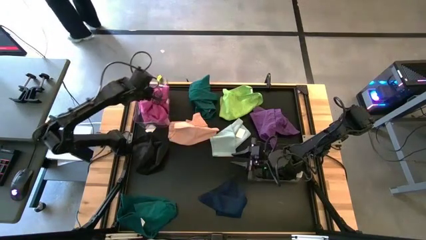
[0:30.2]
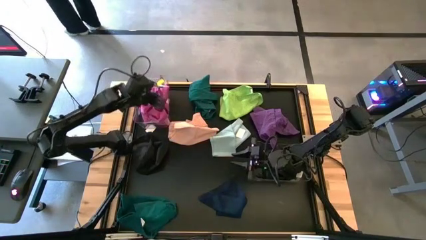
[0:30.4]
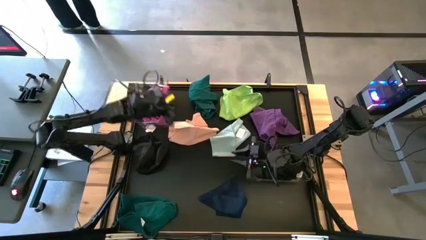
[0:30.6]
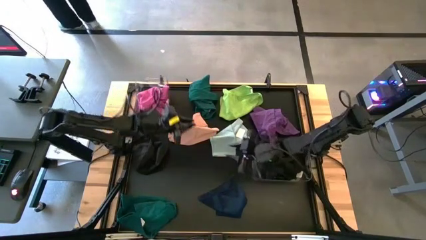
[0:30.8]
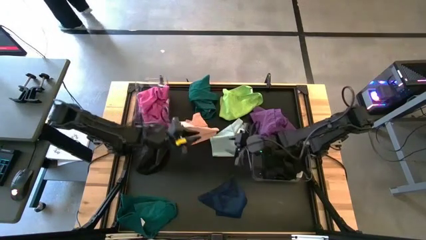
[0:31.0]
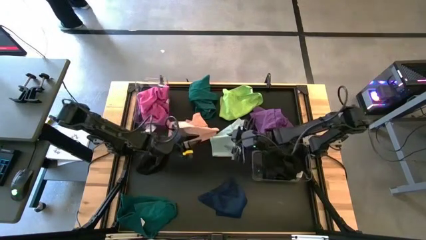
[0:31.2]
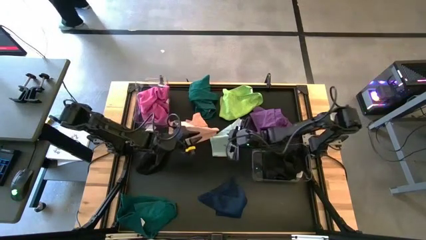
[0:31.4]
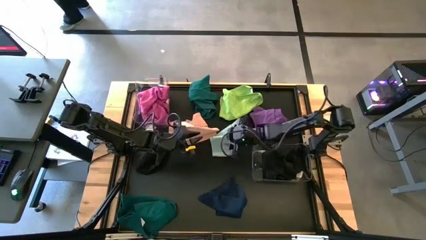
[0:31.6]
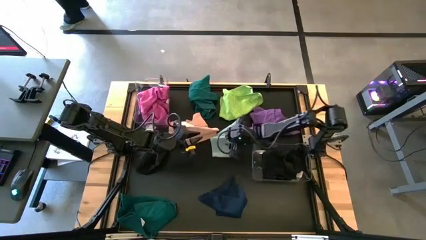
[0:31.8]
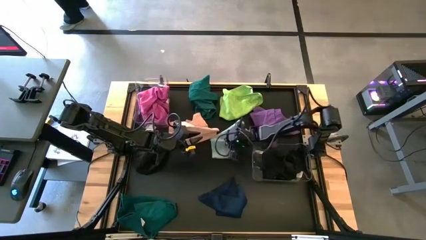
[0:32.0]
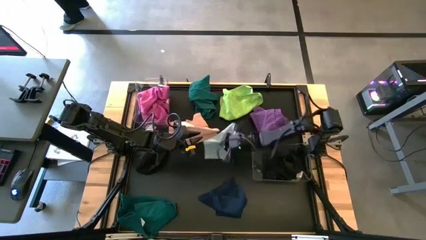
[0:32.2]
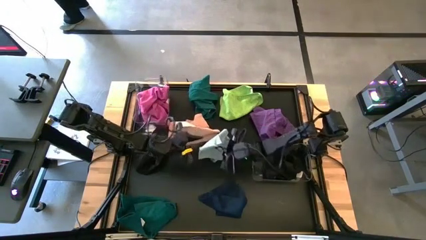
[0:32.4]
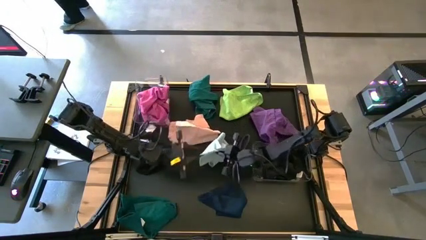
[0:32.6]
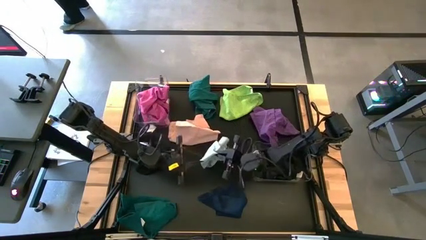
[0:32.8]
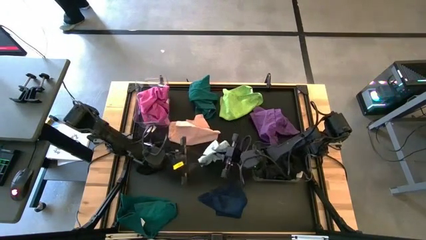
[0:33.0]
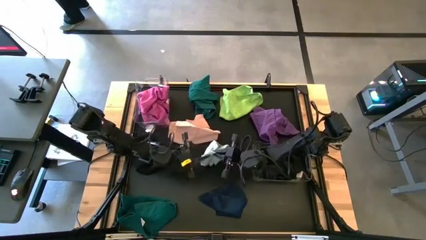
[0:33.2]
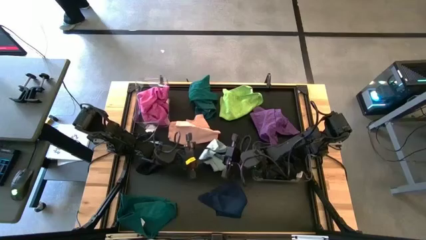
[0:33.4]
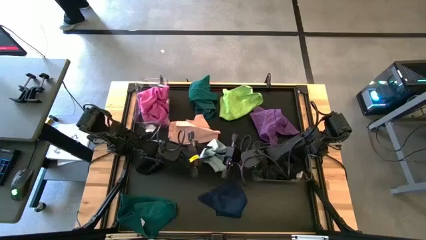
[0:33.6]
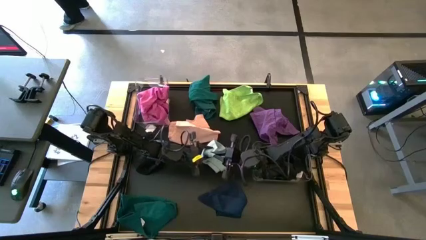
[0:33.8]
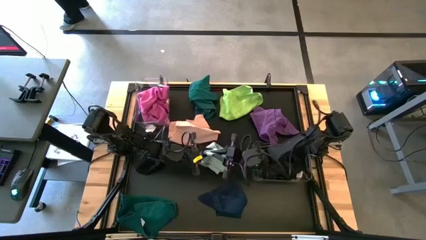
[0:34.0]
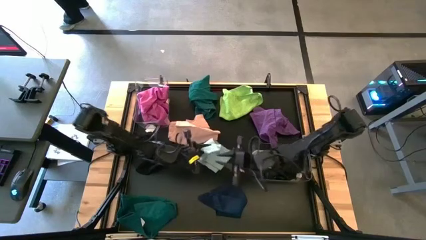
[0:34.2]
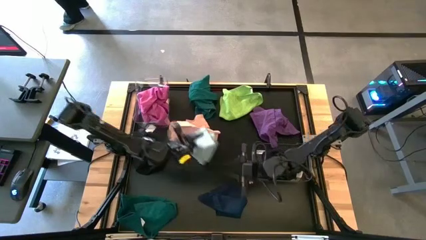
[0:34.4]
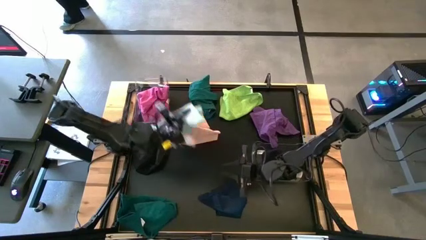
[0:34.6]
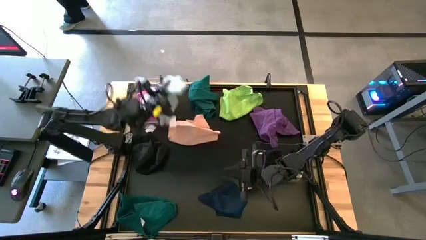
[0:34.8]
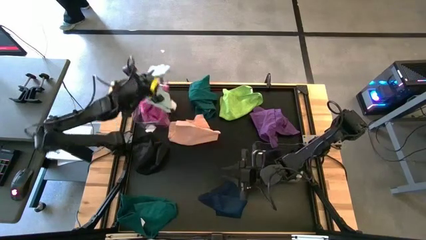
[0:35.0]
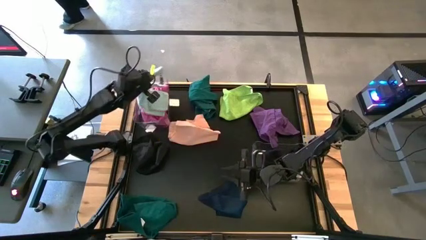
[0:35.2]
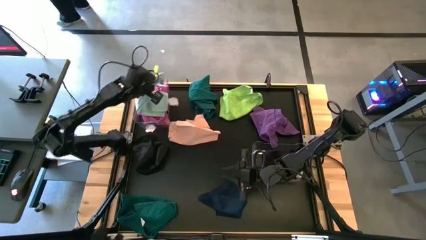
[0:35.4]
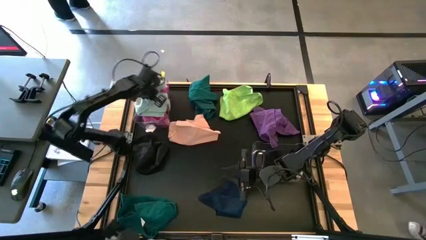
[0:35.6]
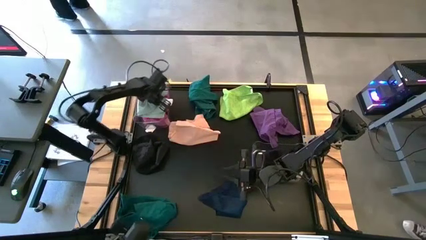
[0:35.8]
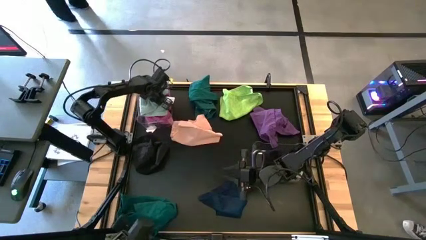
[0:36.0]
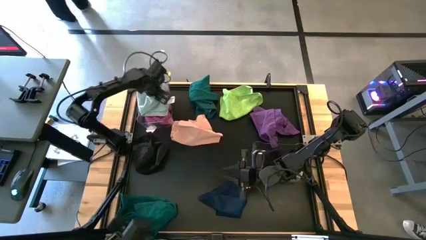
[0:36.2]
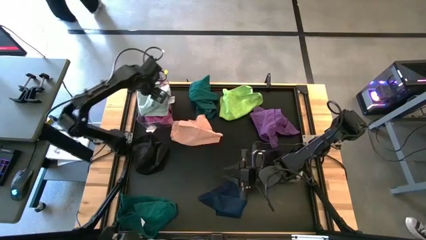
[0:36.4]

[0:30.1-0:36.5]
Task: Sort towels by color in basket
Put the light blue towel into the left transparent bin

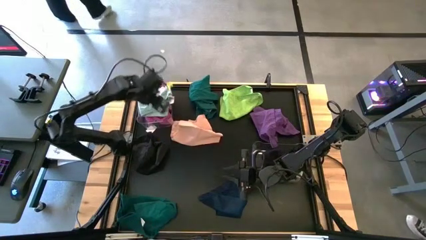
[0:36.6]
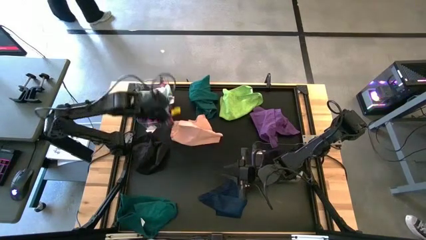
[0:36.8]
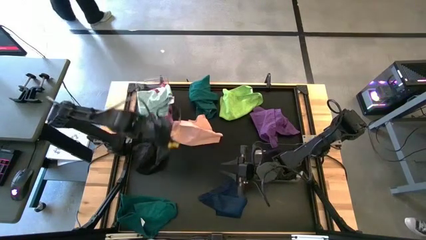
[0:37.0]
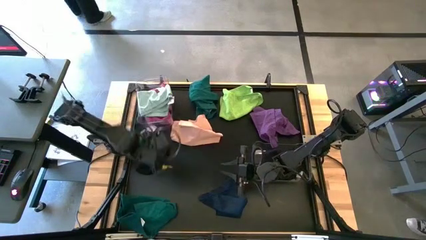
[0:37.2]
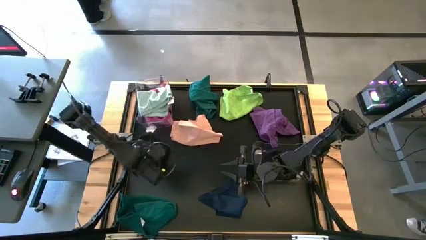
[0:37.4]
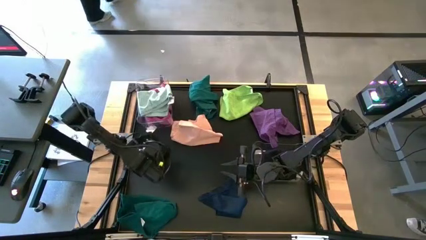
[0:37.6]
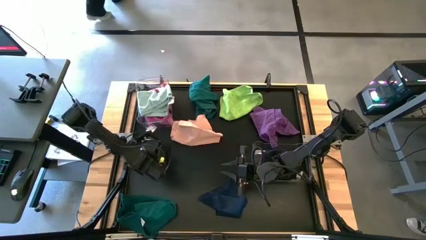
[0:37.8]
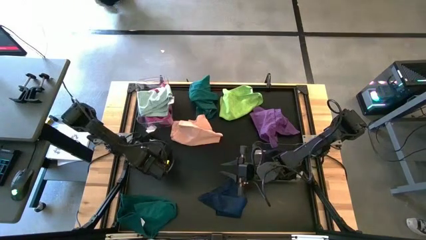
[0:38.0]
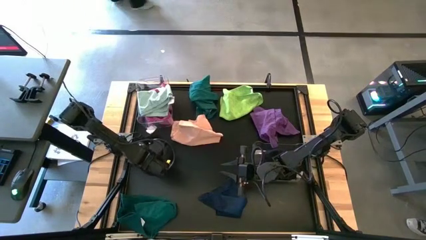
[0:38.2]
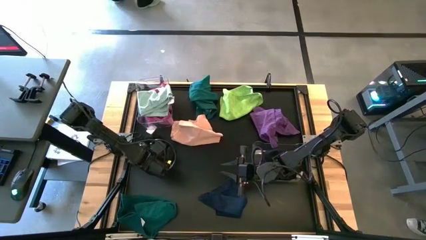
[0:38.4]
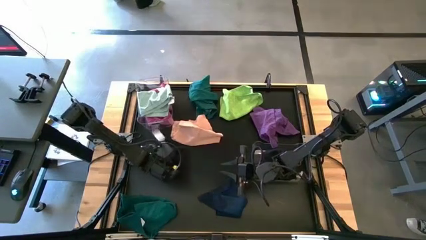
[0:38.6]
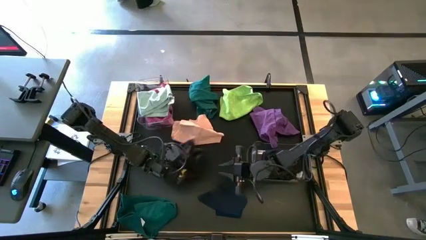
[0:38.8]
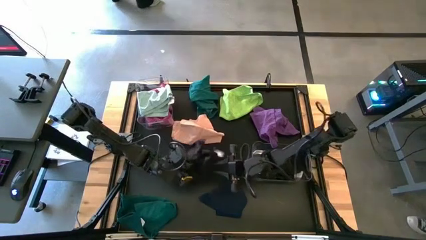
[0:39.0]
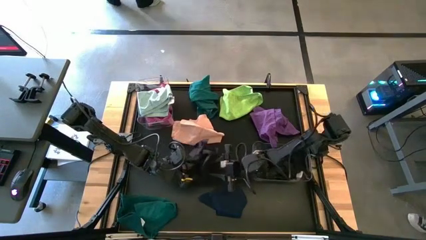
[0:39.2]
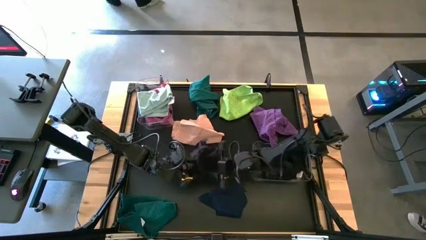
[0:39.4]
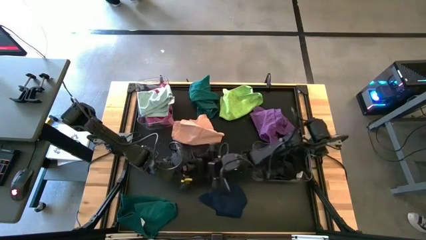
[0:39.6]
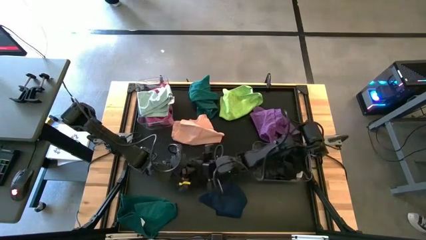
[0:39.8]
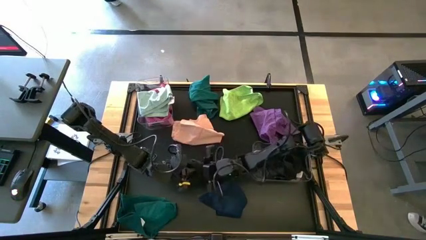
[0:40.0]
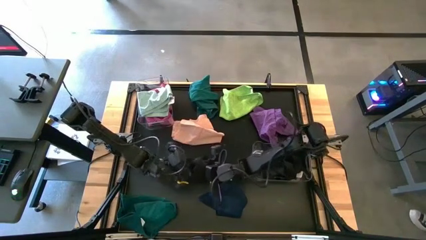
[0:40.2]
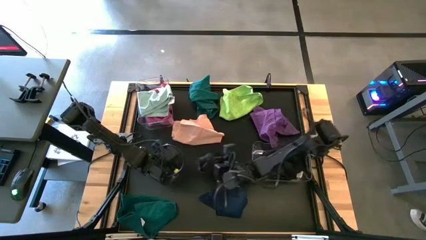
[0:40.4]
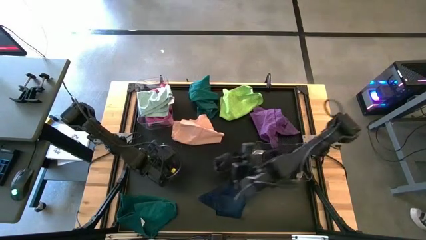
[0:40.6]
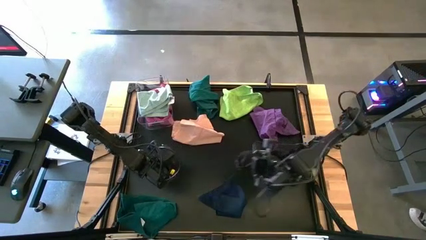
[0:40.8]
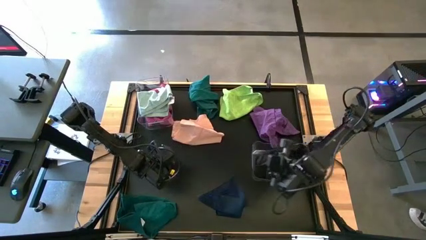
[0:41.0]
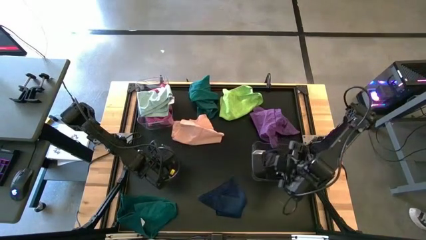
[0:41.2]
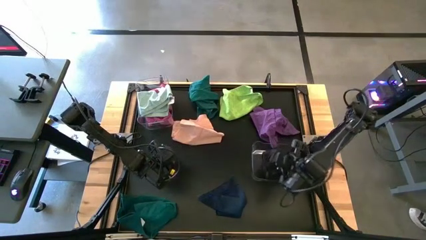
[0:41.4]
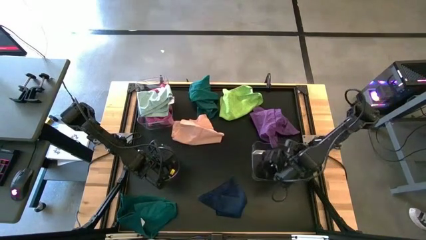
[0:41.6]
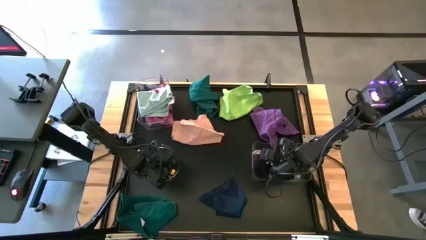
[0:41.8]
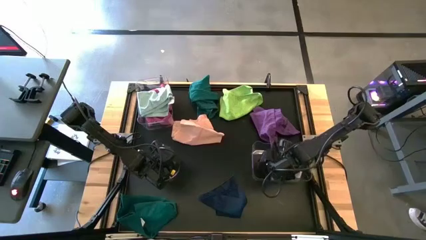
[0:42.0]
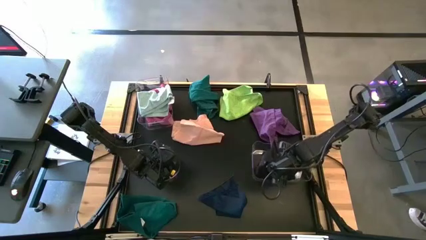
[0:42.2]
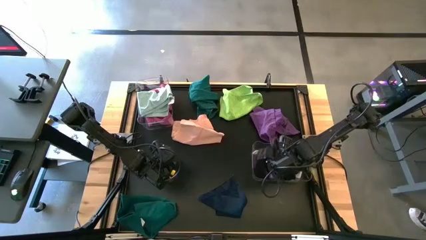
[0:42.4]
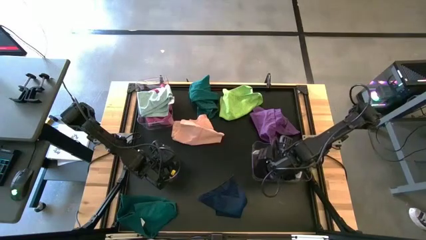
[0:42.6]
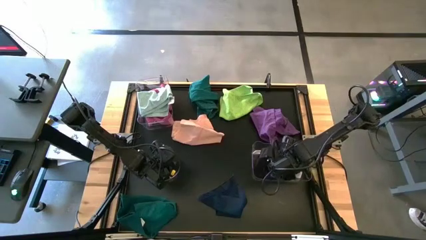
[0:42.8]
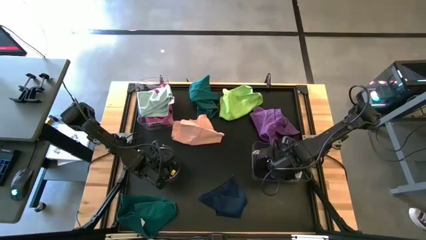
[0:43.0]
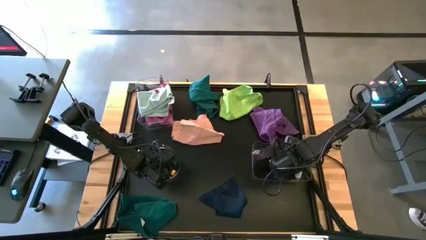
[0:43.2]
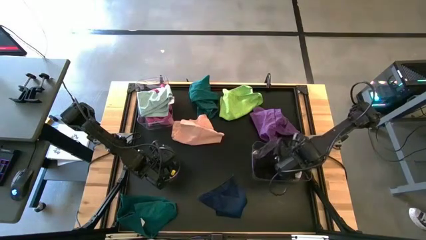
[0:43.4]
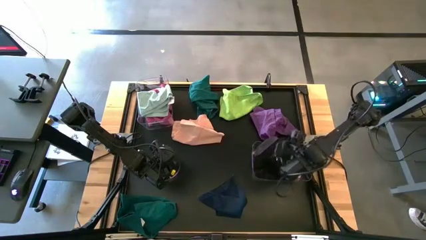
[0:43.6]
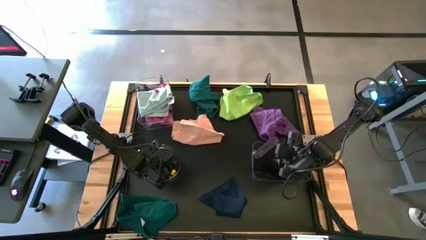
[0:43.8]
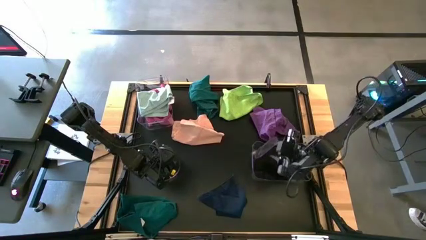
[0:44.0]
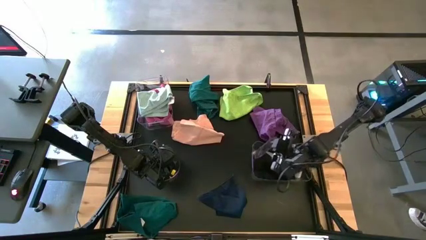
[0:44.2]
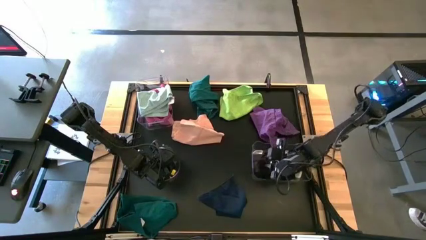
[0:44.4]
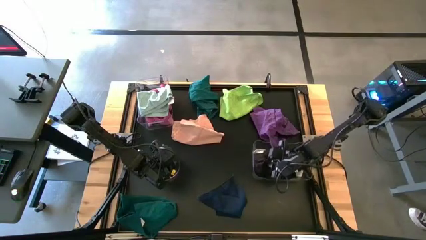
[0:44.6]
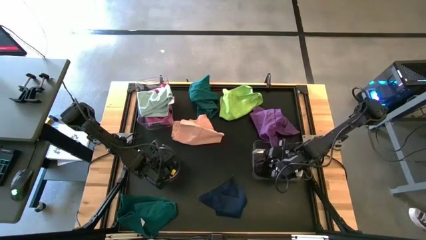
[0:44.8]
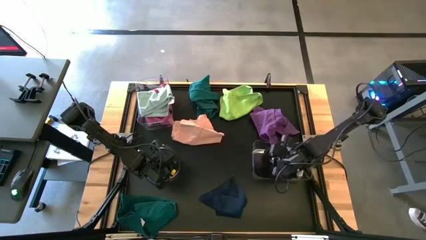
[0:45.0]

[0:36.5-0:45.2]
Put the black towel into the right transparent bin
